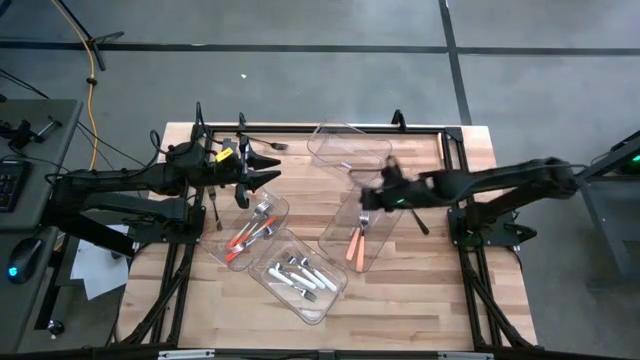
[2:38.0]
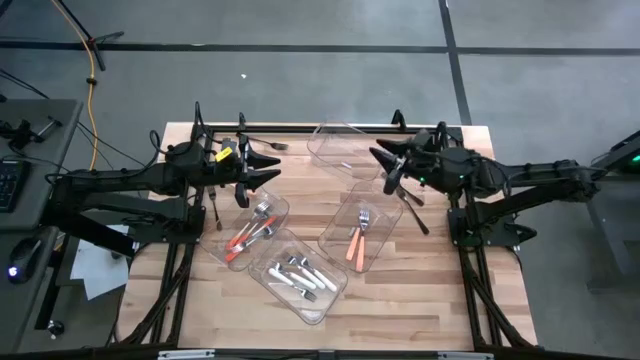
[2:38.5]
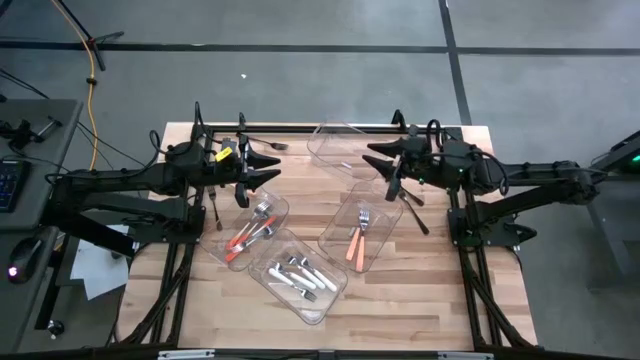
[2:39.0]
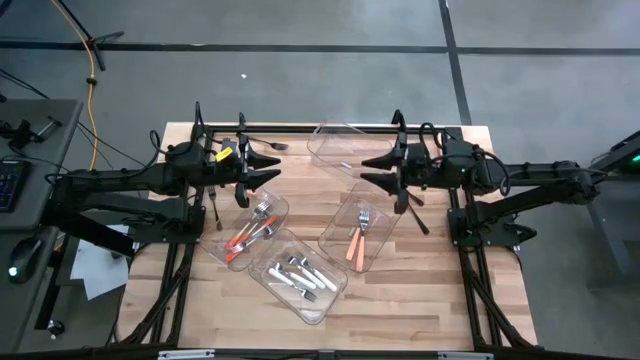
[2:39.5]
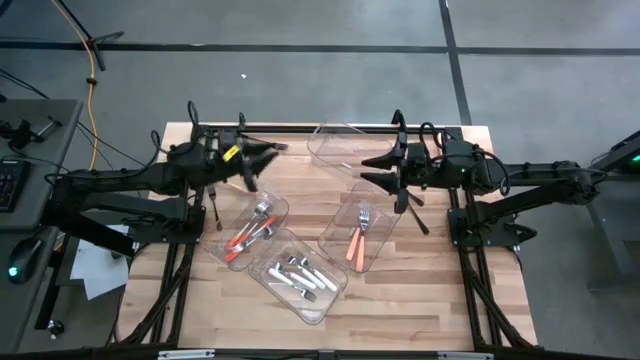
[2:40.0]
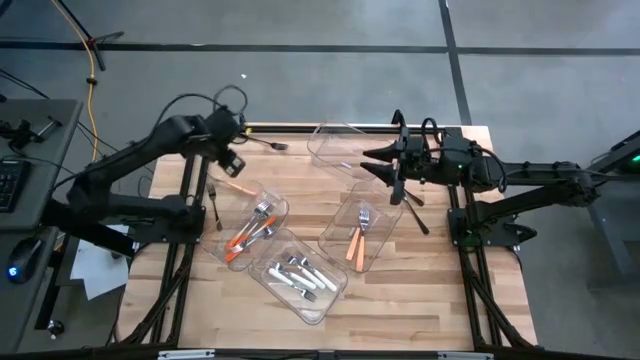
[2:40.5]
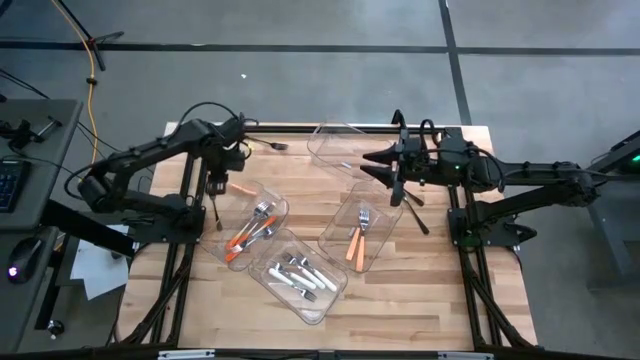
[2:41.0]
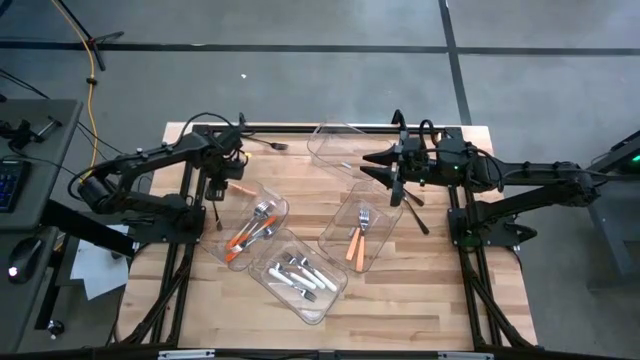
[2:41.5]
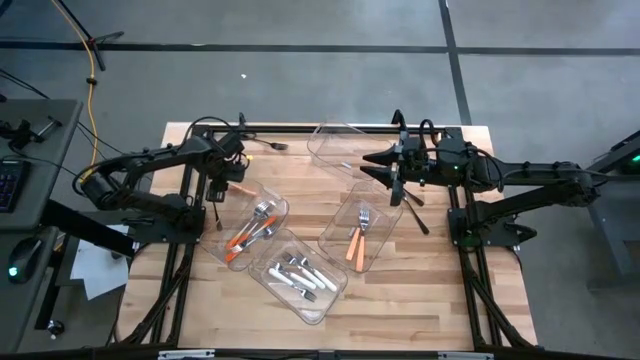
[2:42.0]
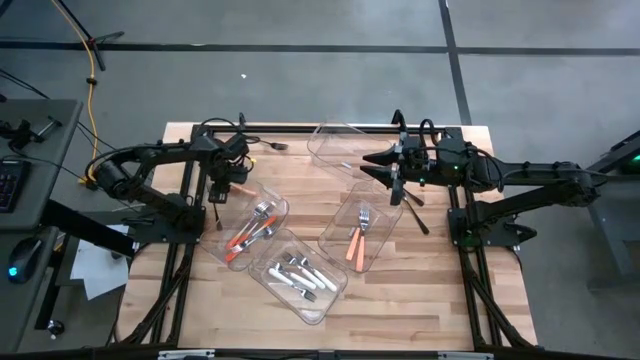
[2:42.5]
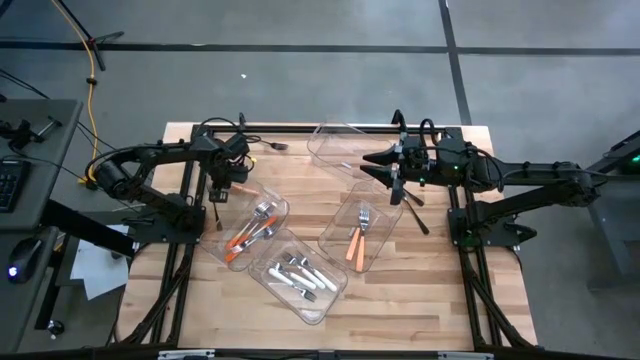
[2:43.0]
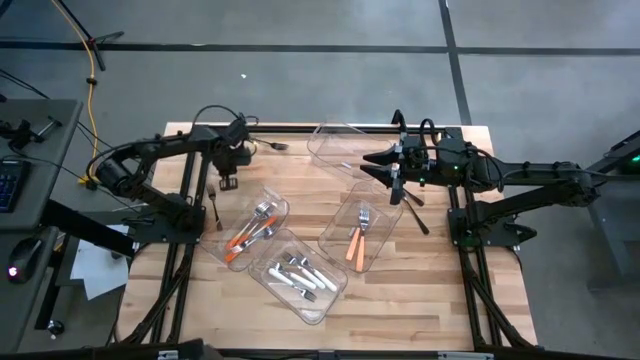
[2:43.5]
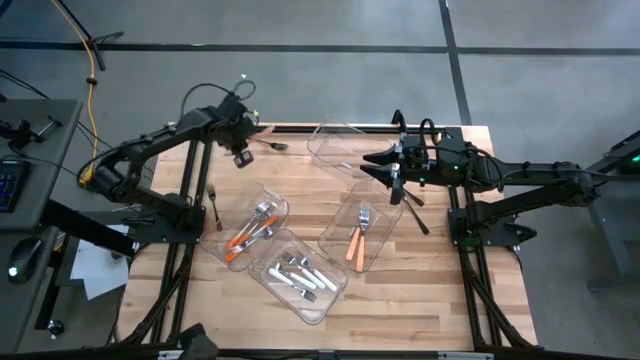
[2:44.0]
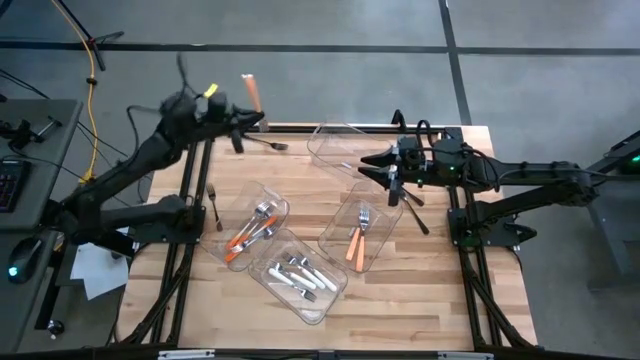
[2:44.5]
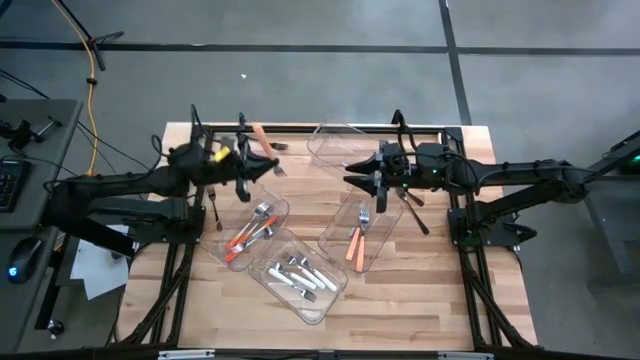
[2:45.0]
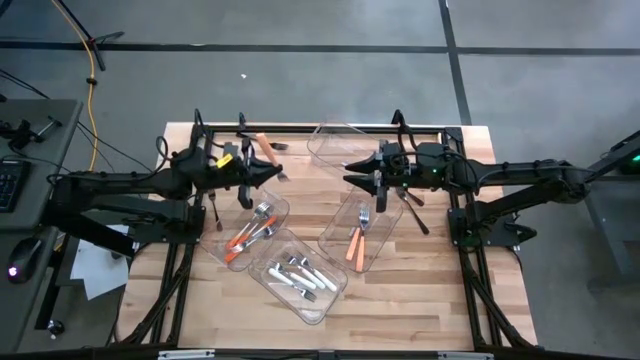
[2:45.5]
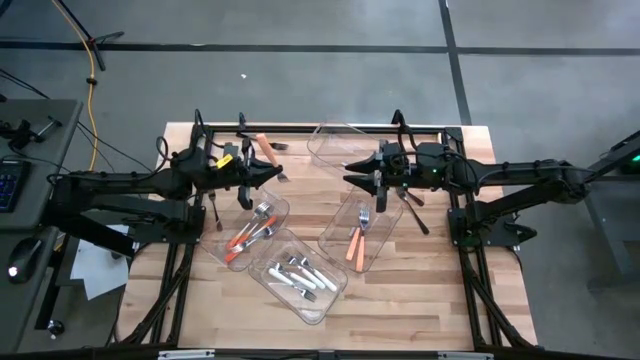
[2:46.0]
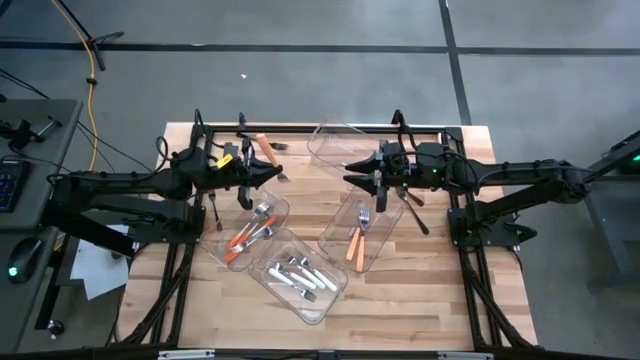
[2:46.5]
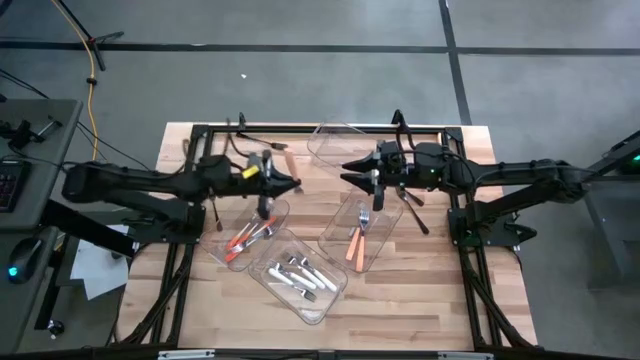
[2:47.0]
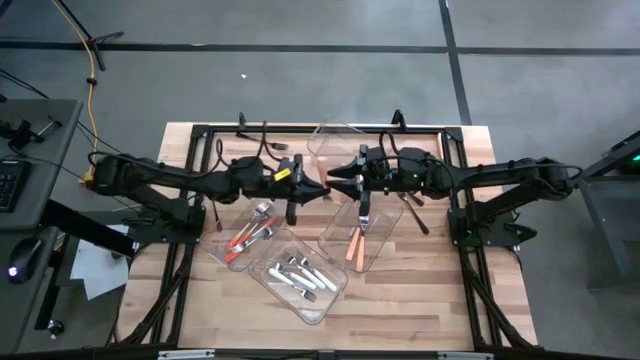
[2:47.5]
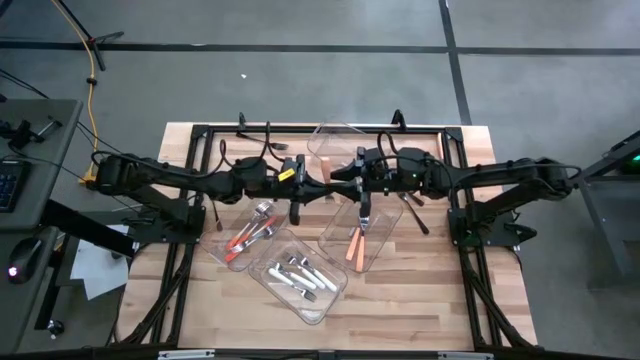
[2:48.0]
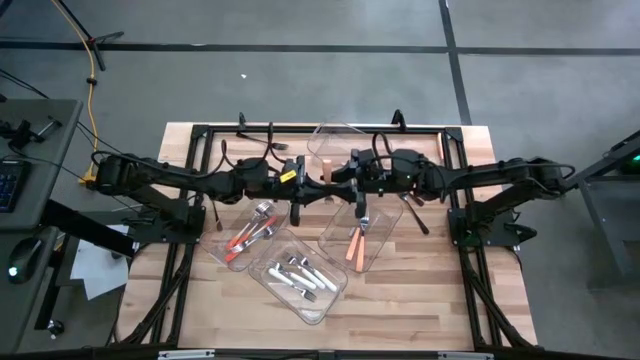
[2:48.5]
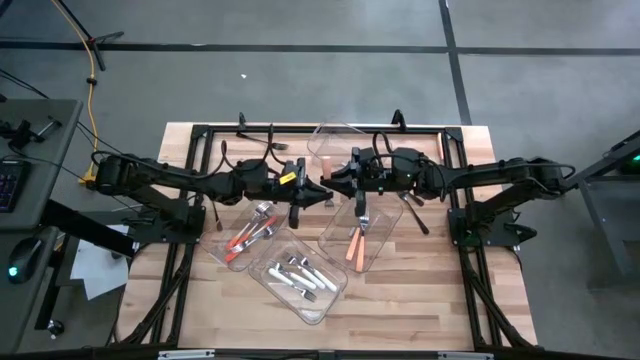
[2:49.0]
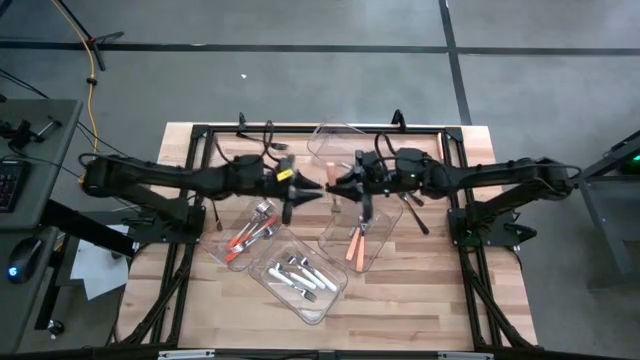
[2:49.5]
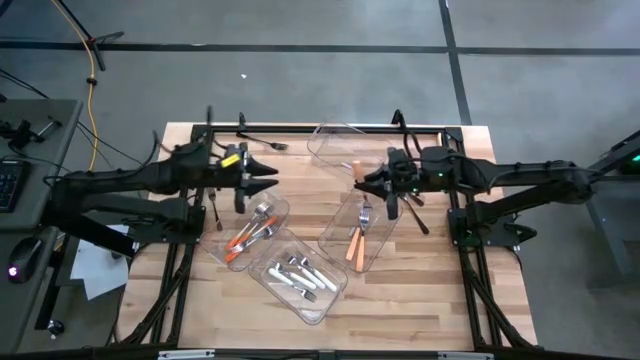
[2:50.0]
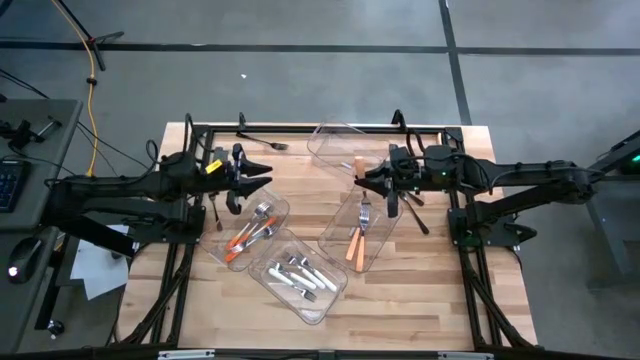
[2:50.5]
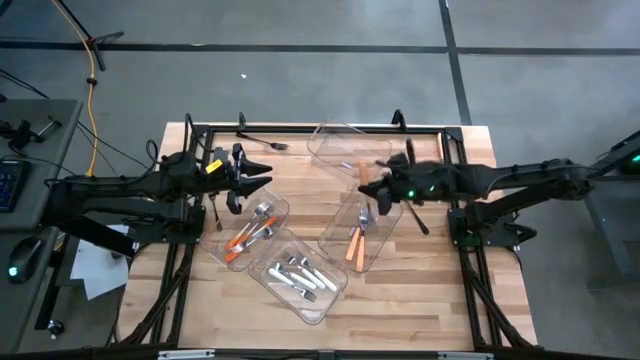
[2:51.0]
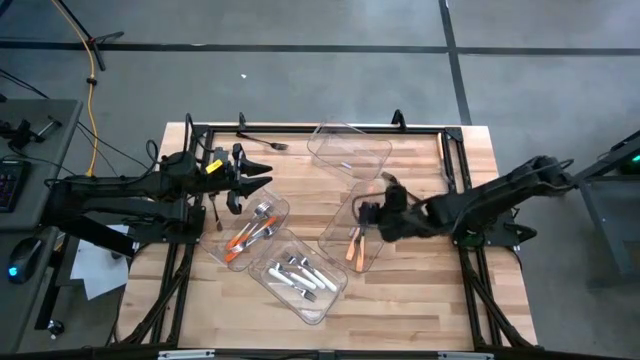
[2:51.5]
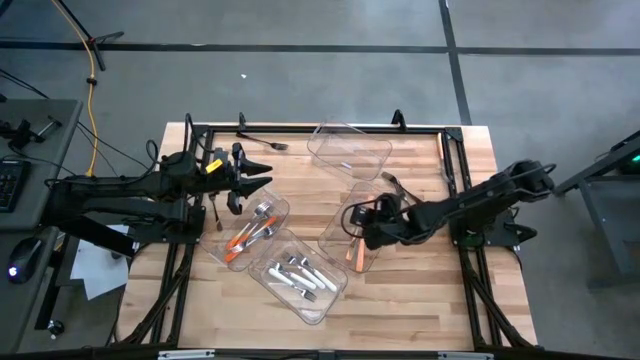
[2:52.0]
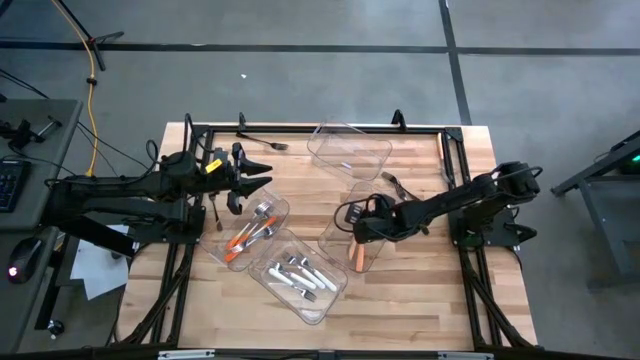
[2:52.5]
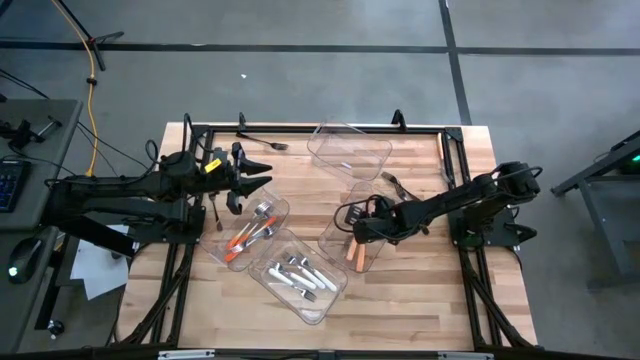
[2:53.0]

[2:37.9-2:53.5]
Task: Sort silverware by color (type)
Put the light orange fork into the middle right transparent bin

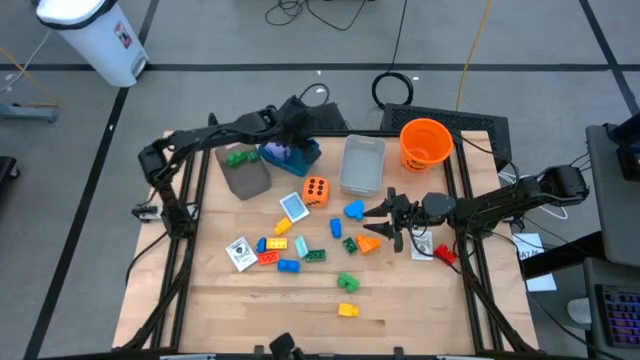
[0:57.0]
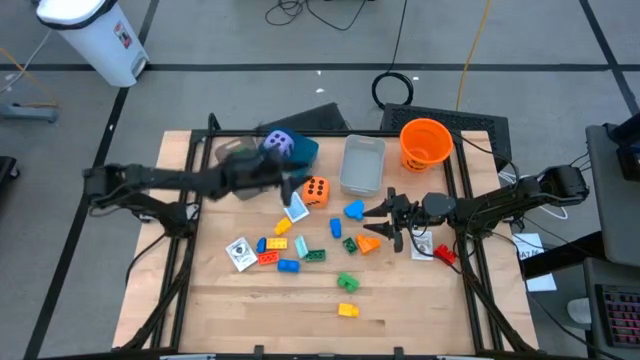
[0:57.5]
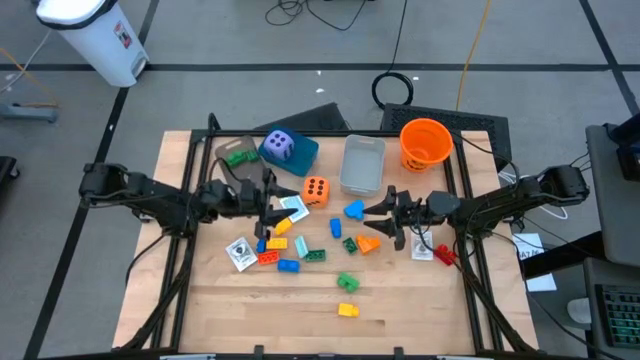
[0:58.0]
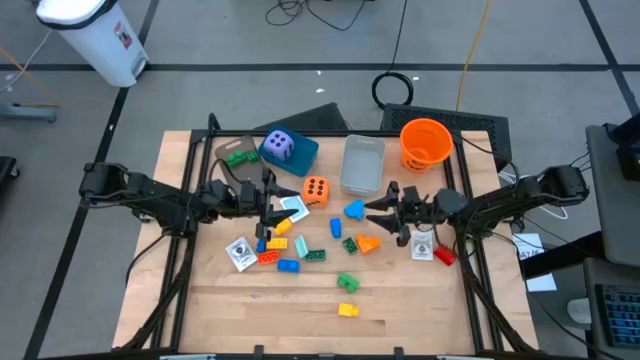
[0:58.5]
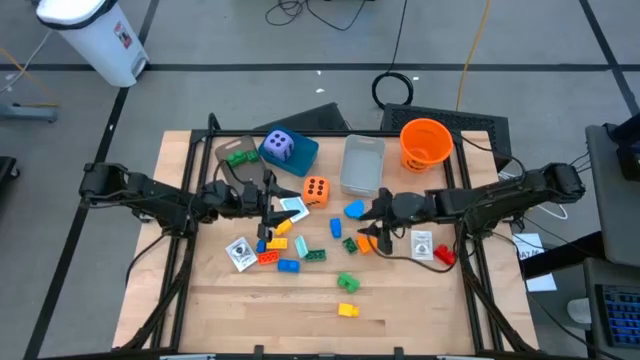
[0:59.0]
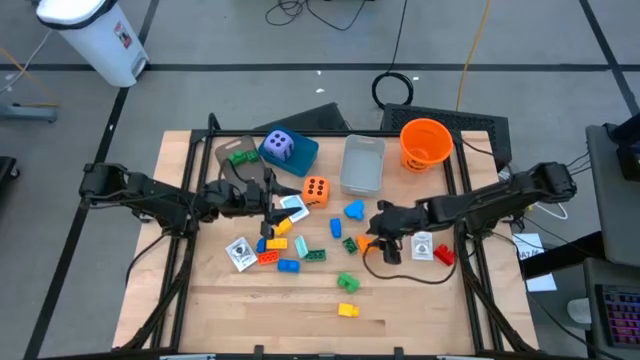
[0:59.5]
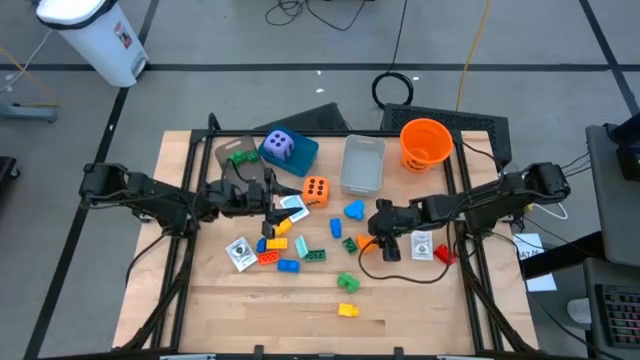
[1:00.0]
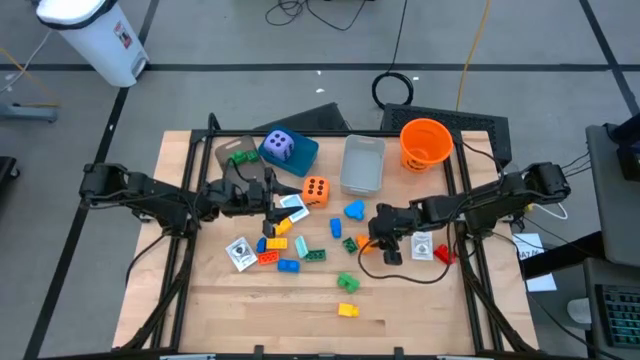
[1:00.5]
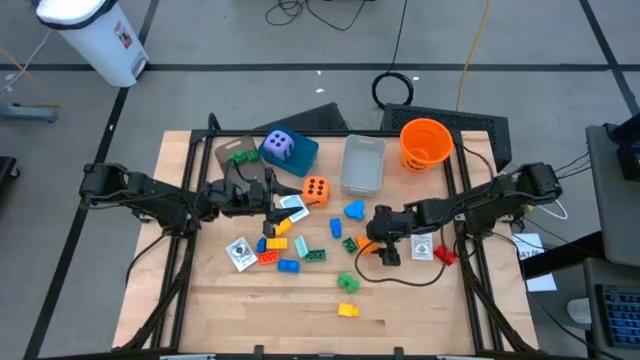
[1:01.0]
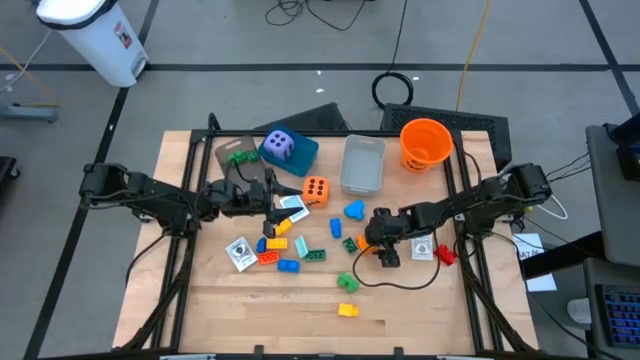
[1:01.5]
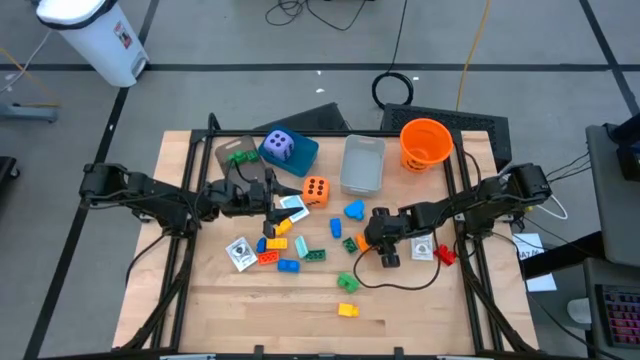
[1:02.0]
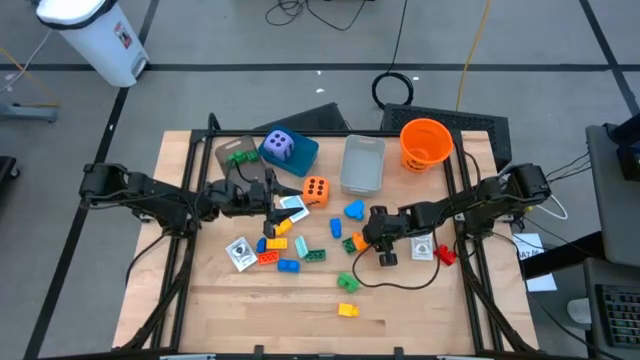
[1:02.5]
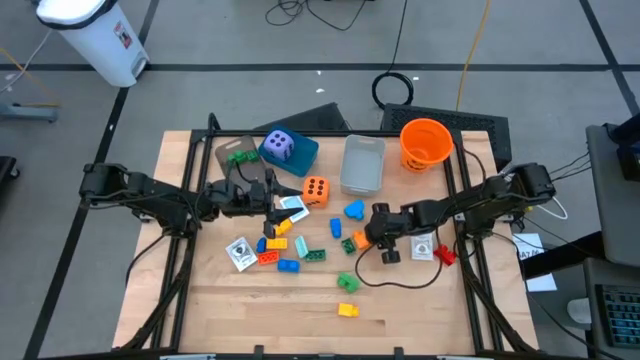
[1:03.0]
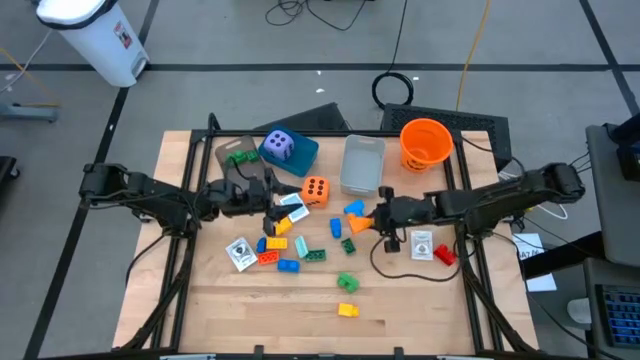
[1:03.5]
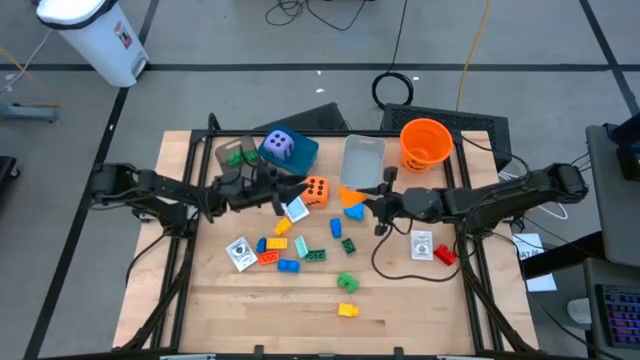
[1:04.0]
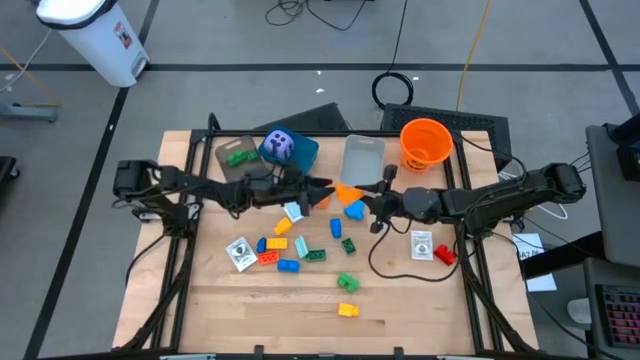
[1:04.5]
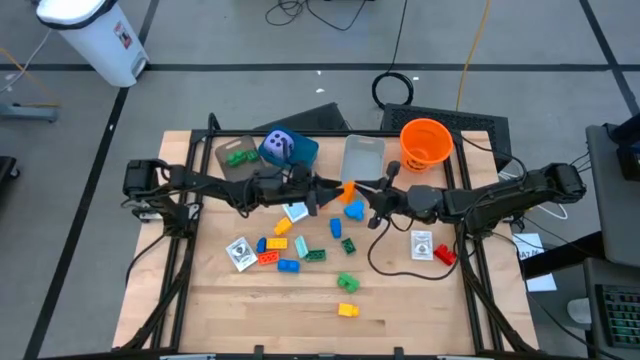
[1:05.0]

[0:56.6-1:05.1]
Task: Pick & Place Toys
Put the orange game piece into the black bin
